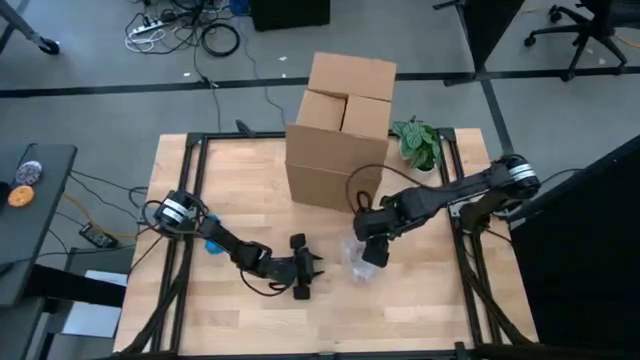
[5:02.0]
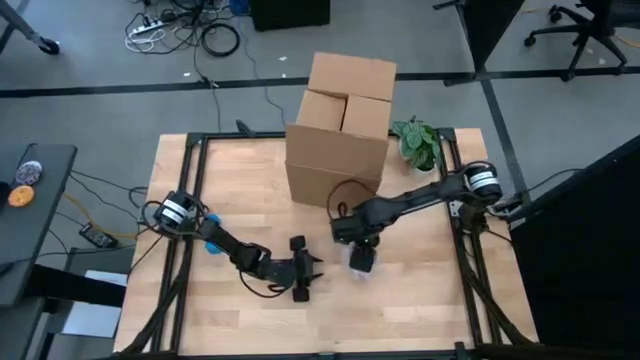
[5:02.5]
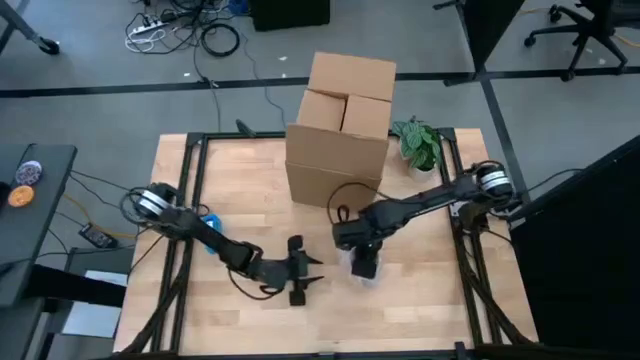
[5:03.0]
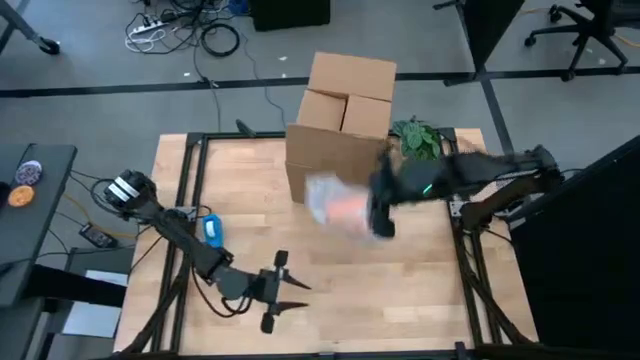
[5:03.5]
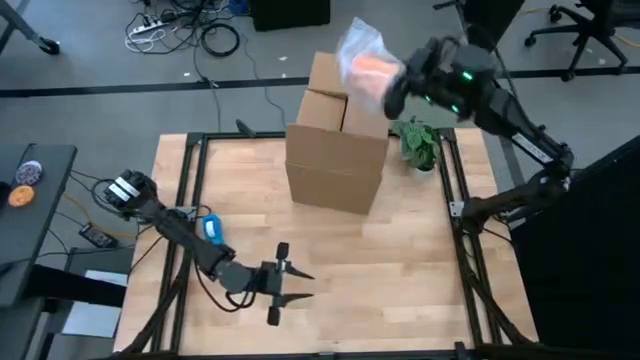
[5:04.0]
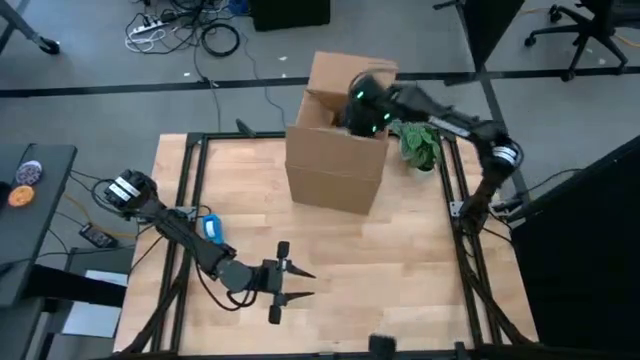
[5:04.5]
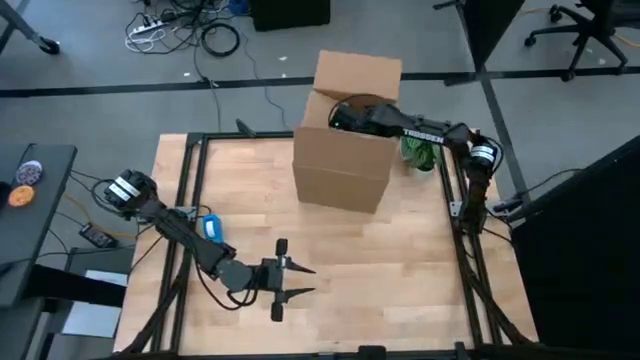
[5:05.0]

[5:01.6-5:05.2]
Task: wrap mug
Put the wrapped orange mug into the cardboard box

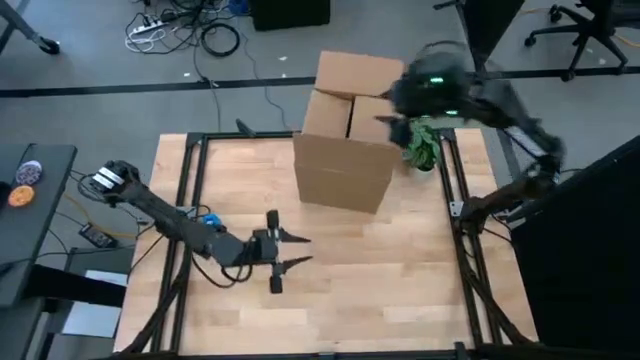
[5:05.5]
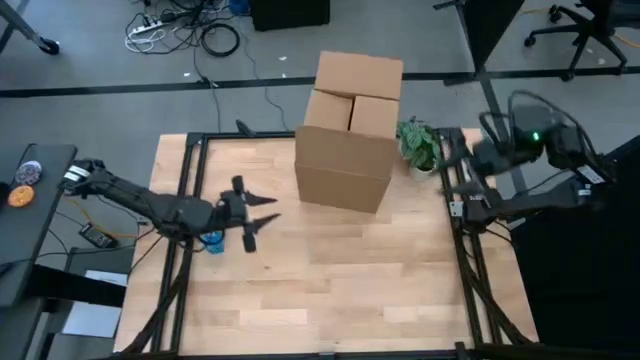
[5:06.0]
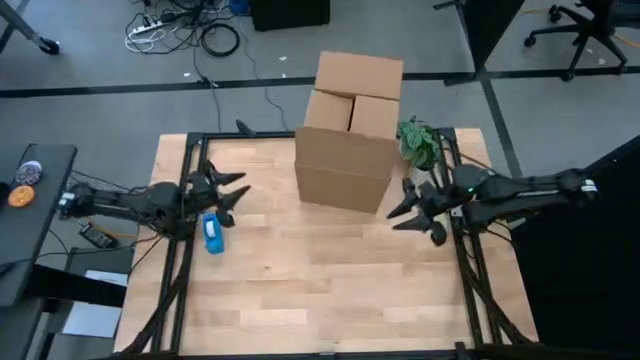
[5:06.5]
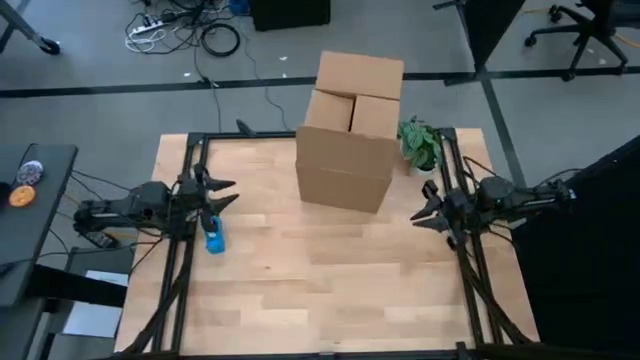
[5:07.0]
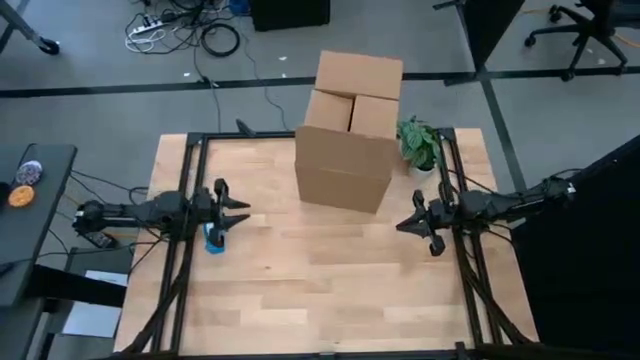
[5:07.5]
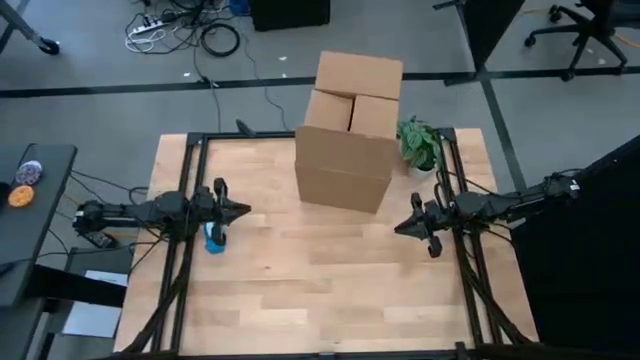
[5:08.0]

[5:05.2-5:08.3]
Return to Home Position

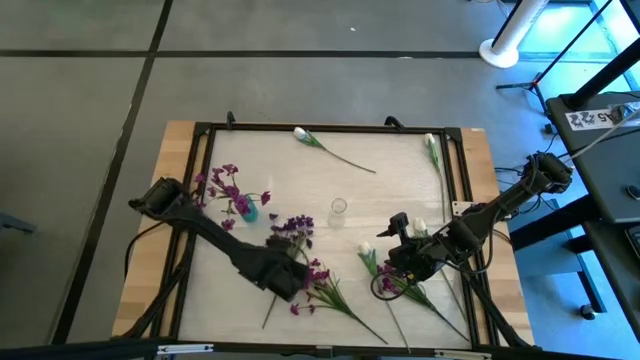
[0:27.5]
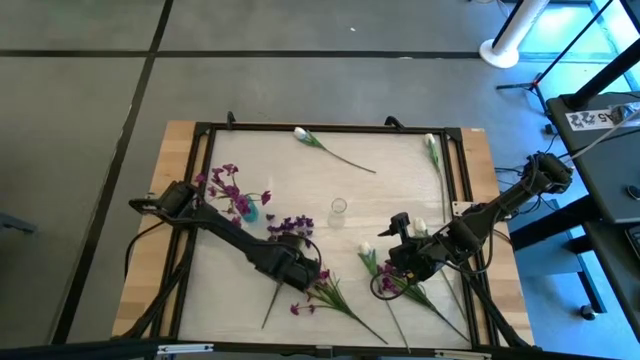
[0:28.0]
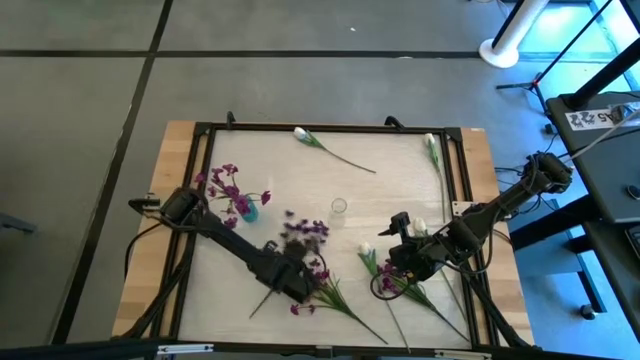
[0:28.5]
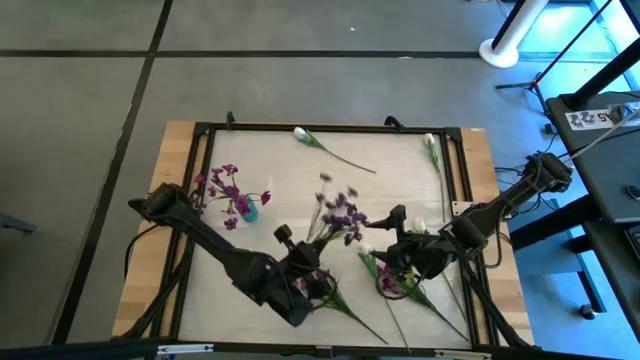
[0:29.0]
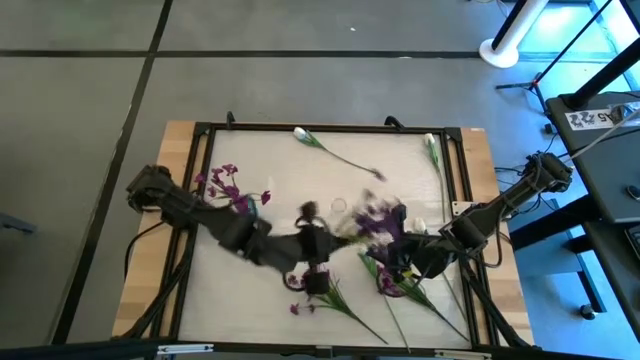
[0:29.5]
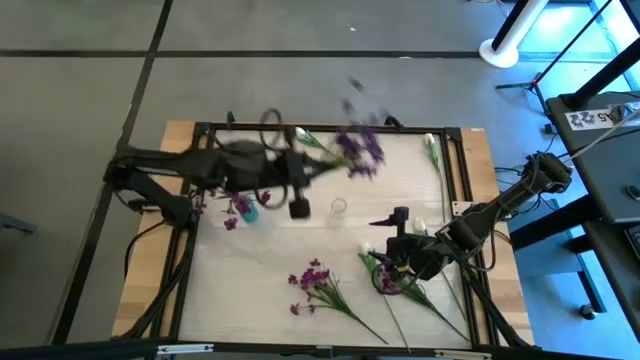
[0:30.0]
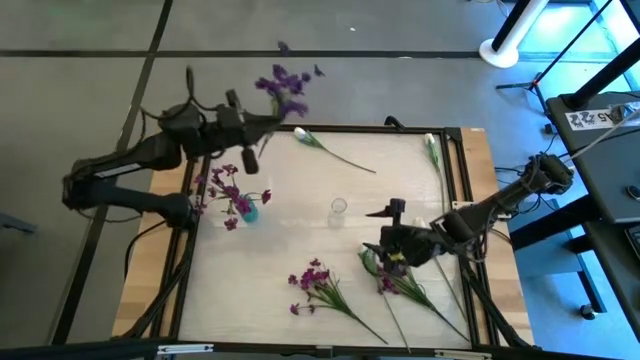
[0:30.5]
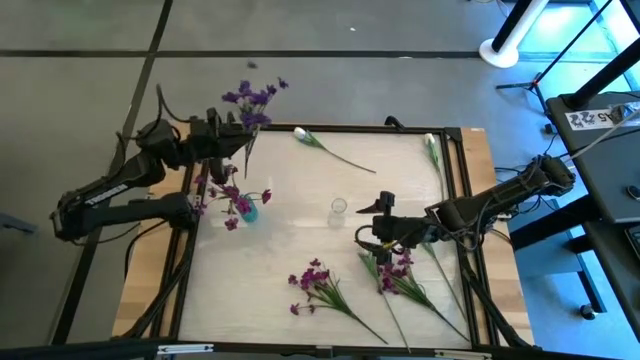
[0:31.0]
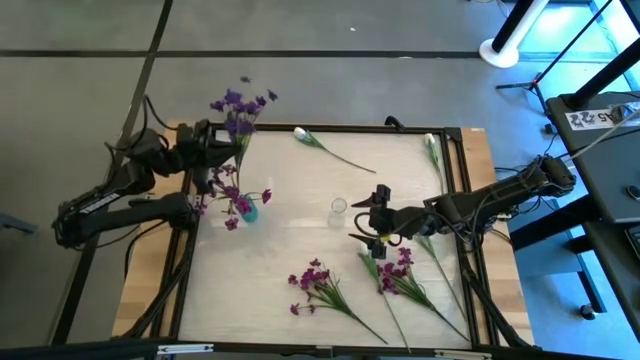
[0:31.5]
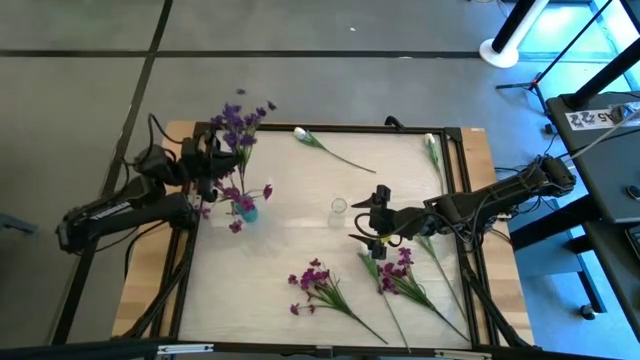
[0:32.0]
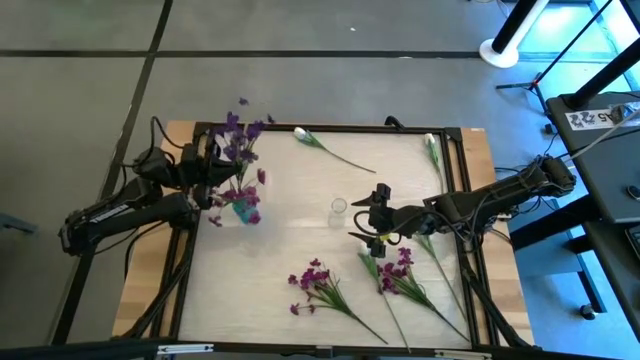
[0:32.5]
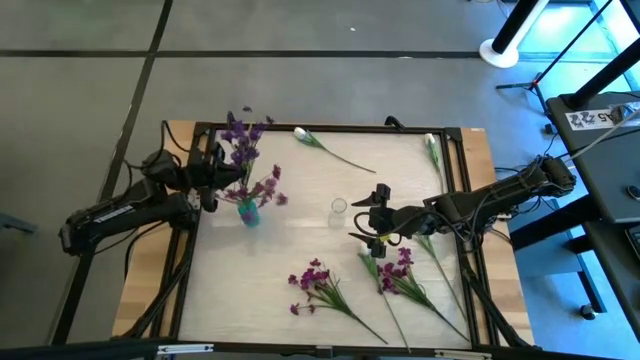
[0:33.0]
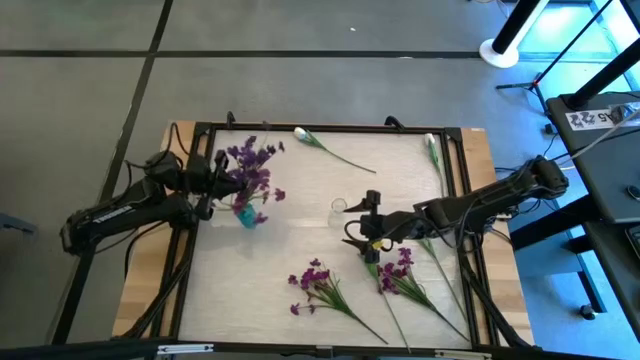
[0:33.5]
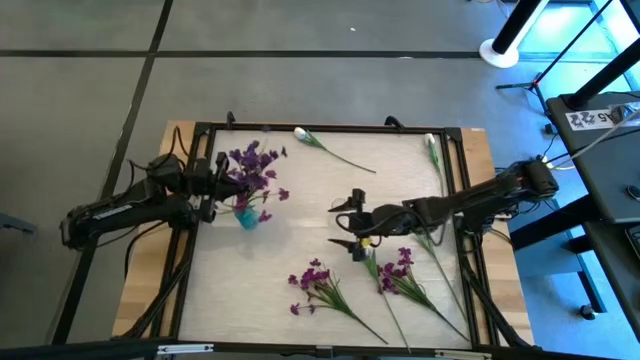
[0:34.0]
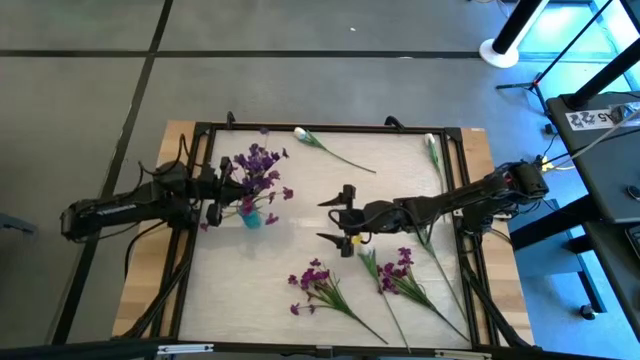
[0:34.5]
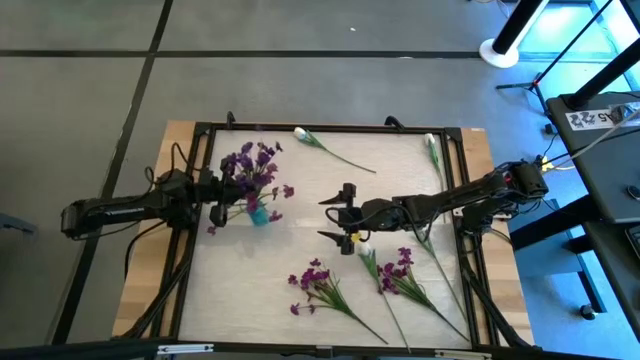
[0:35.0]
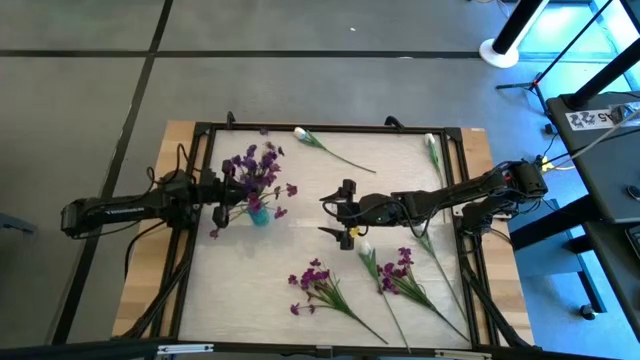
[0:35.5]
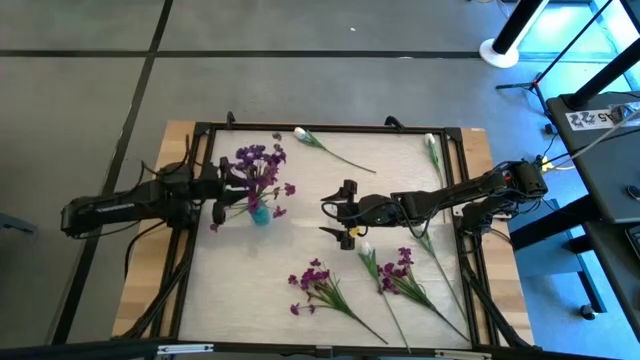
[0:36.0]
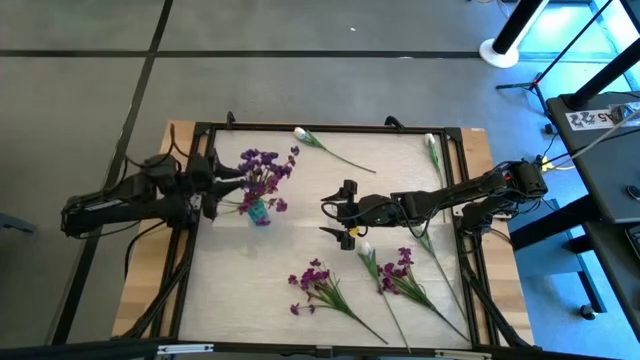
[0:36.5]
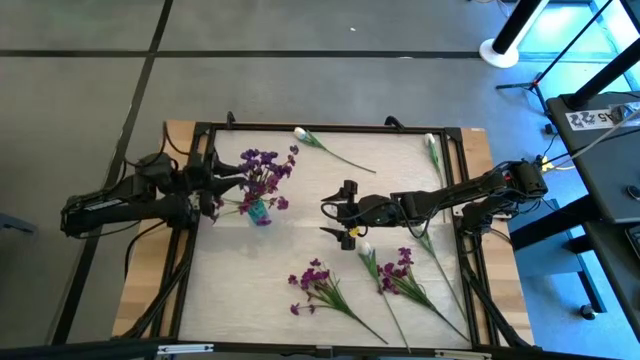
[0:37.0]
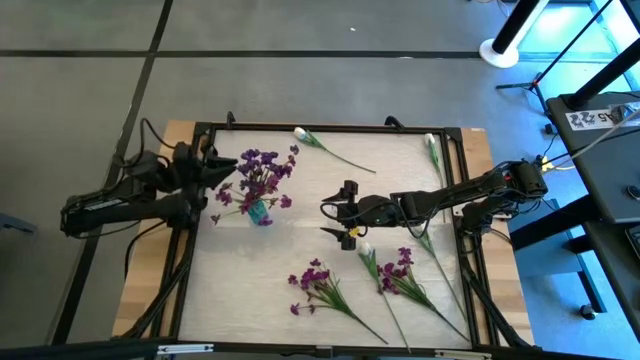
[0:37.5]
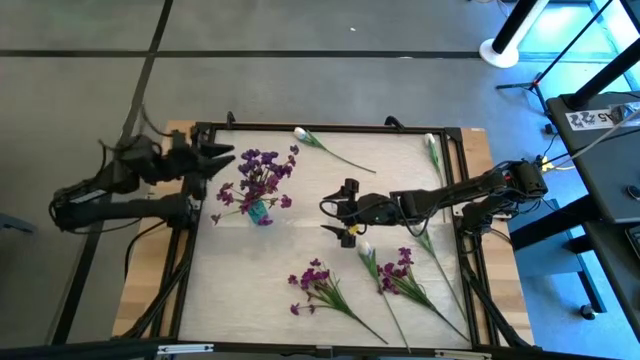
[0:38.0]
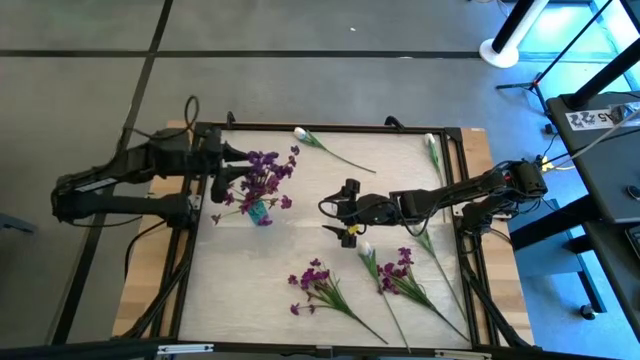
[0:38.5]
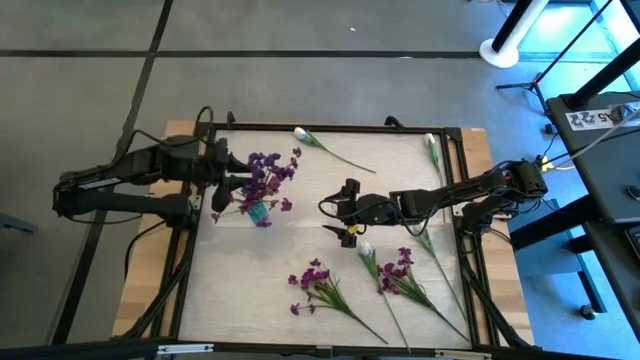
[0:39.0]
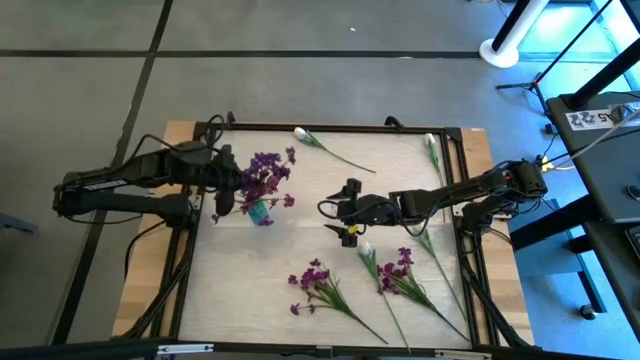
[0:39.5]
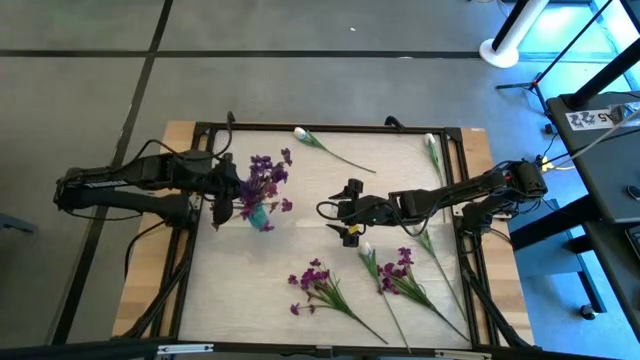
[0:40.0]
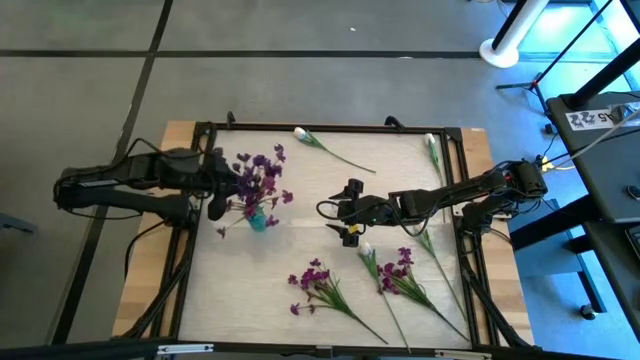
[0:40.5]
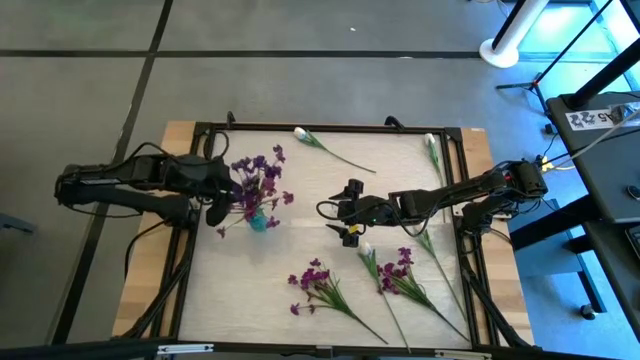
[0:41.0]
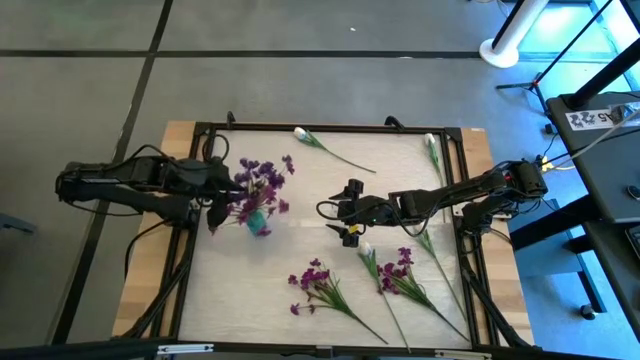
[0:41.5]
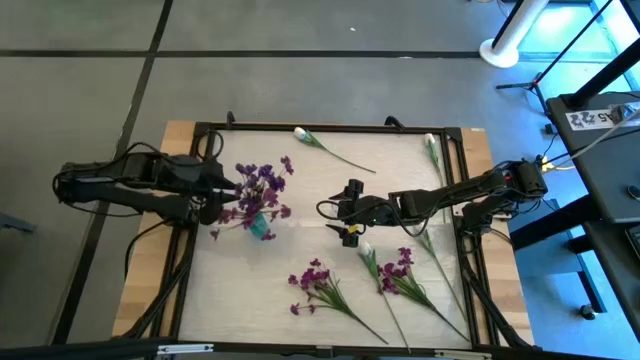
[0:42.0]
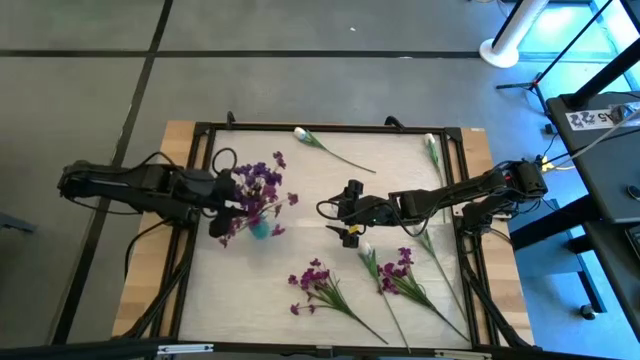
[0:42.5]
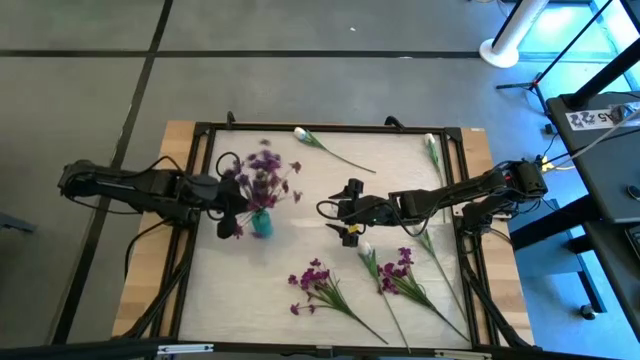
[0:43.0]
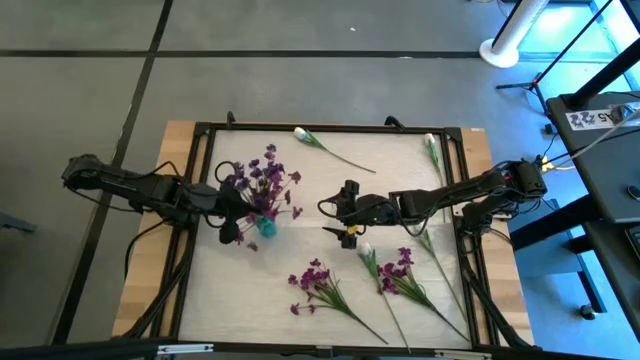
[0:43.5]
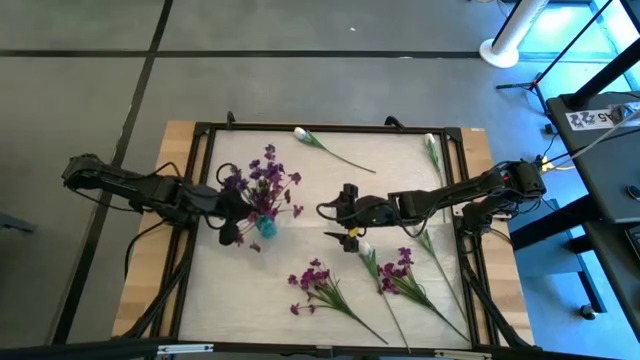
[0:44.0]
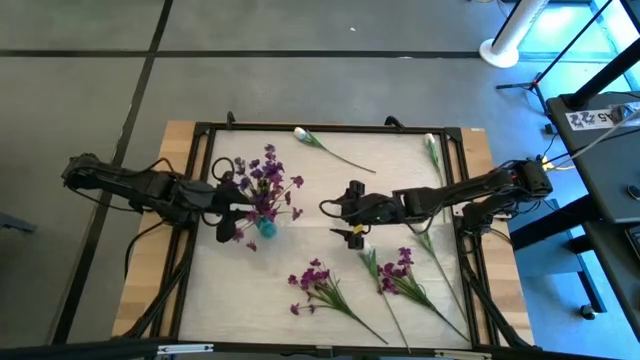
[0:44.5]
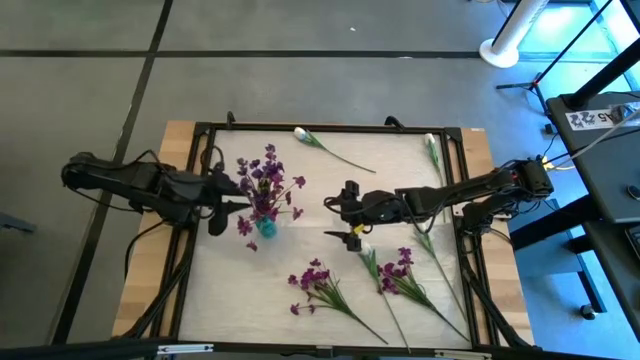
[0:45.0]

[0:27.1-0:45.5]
Task: Sort flowers into vase by color
Put the violet flowers into the blue flower vase
